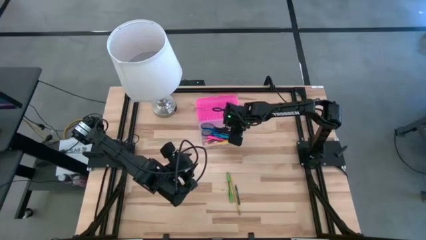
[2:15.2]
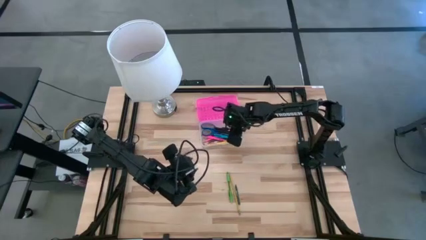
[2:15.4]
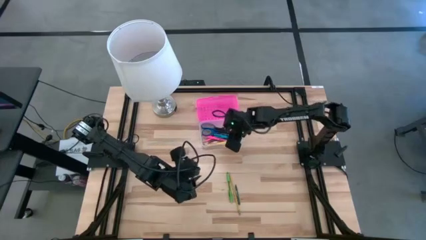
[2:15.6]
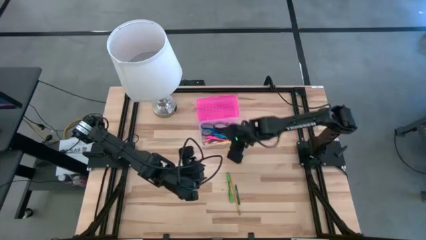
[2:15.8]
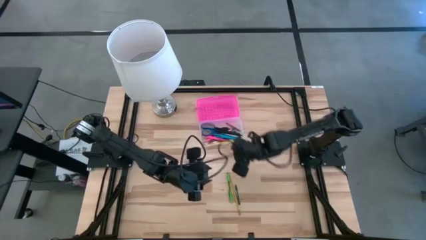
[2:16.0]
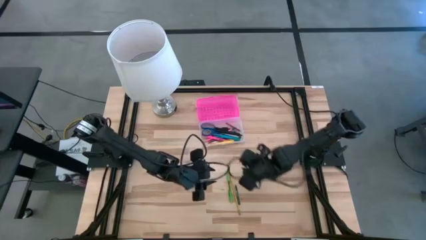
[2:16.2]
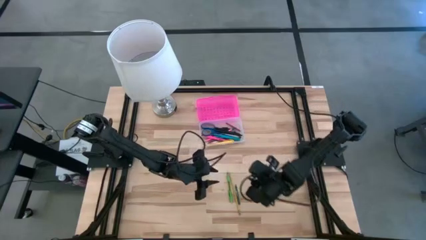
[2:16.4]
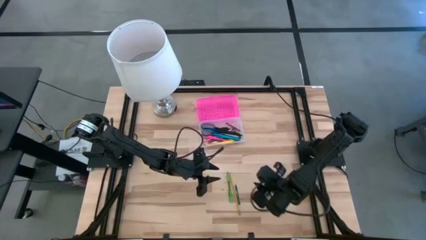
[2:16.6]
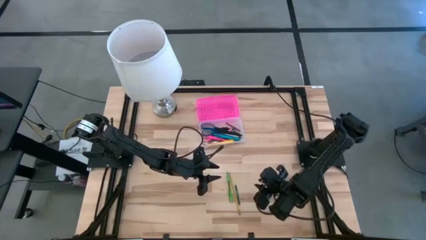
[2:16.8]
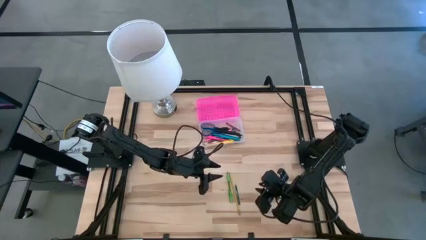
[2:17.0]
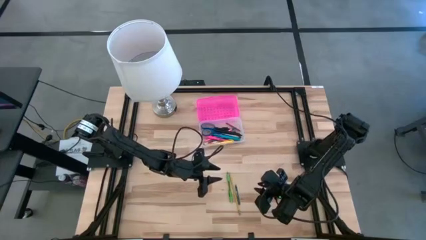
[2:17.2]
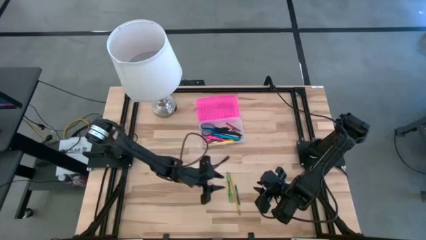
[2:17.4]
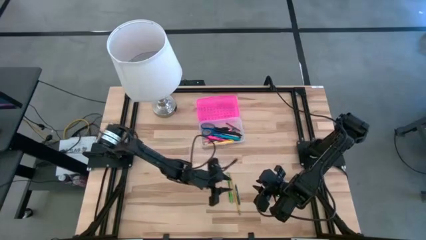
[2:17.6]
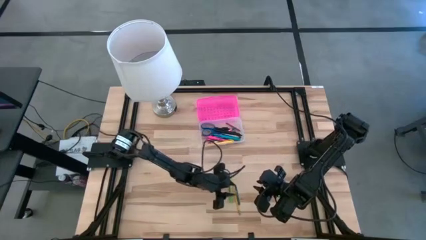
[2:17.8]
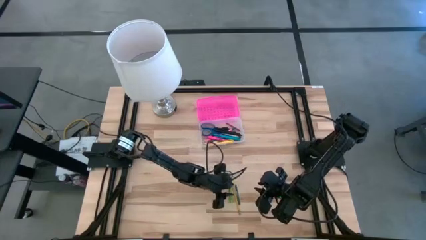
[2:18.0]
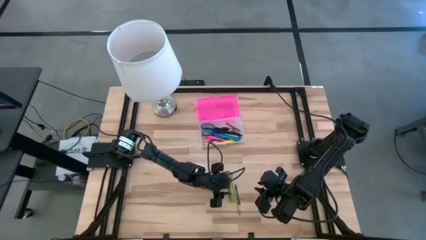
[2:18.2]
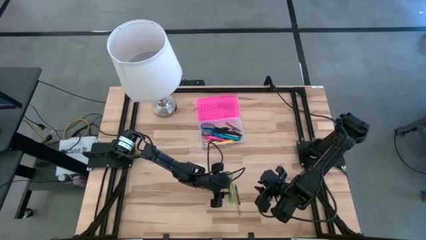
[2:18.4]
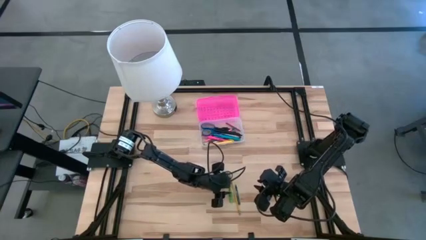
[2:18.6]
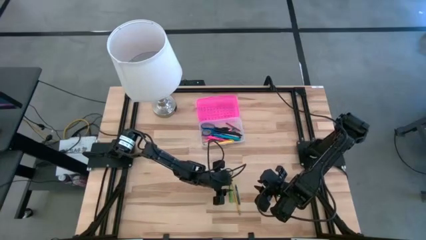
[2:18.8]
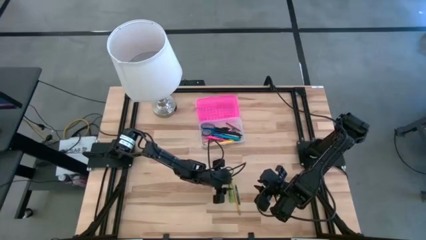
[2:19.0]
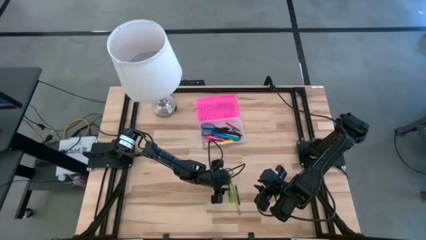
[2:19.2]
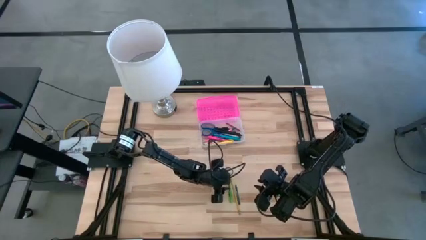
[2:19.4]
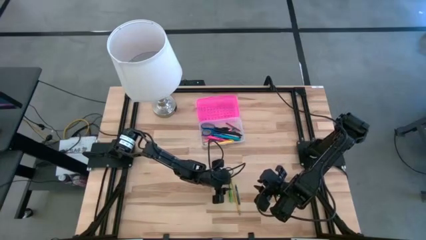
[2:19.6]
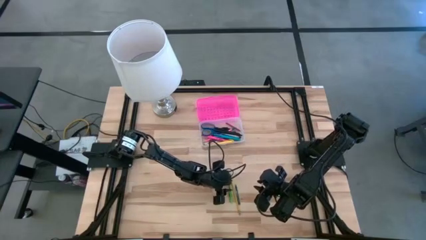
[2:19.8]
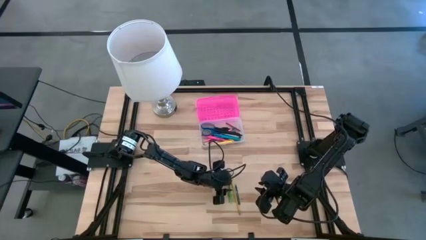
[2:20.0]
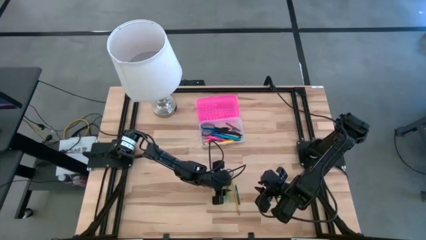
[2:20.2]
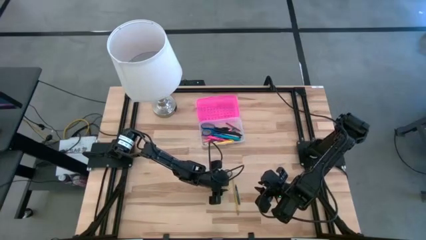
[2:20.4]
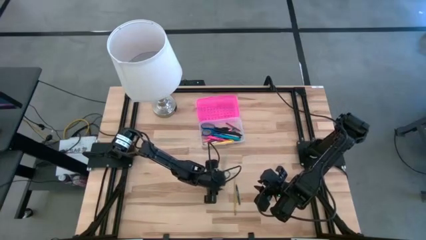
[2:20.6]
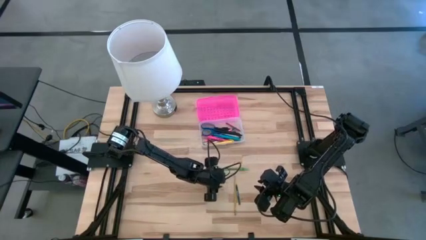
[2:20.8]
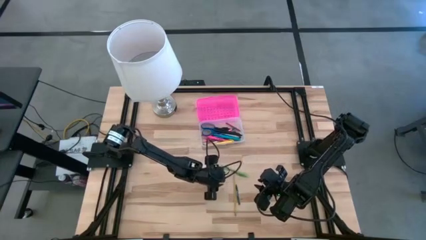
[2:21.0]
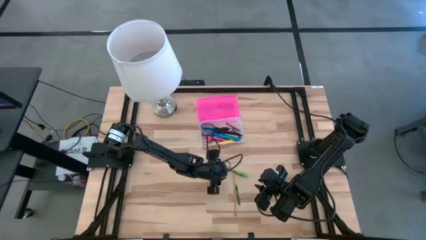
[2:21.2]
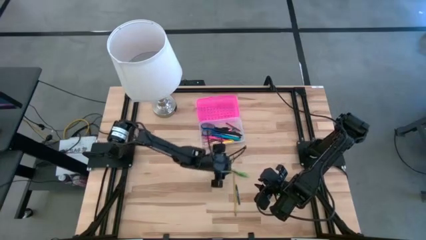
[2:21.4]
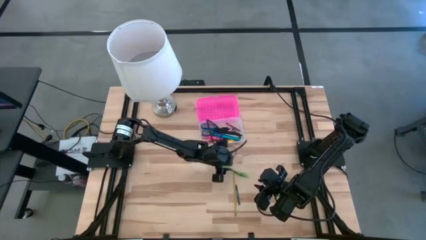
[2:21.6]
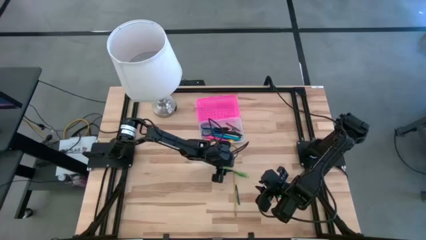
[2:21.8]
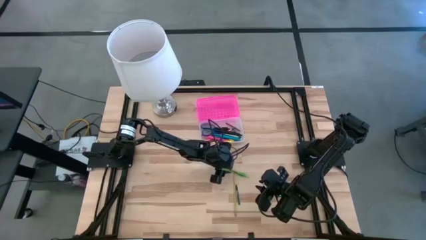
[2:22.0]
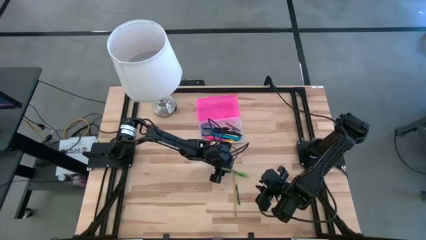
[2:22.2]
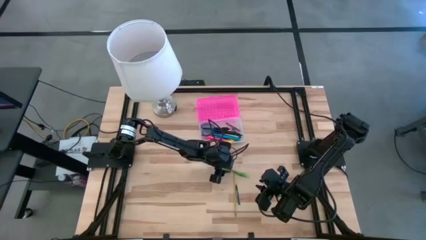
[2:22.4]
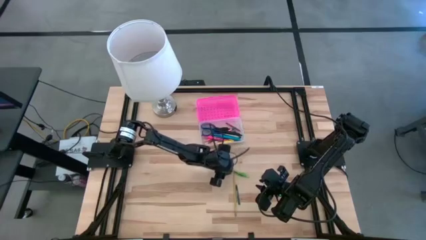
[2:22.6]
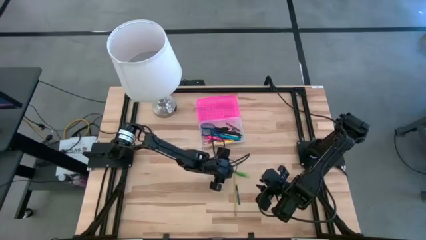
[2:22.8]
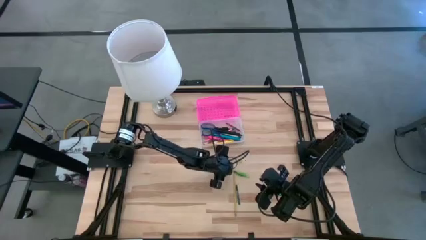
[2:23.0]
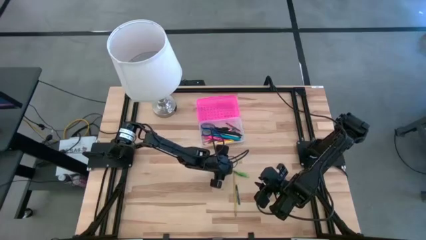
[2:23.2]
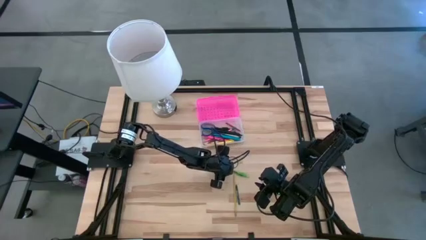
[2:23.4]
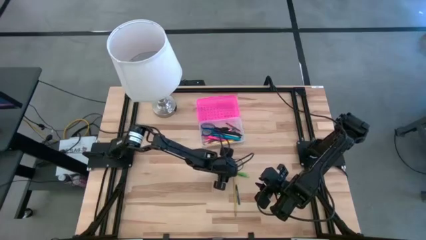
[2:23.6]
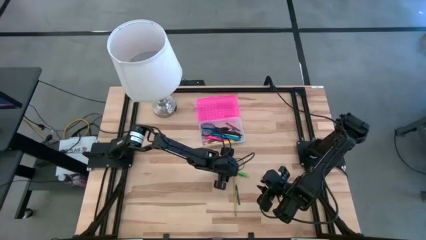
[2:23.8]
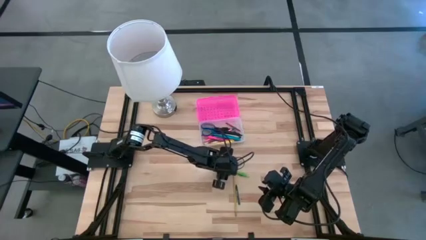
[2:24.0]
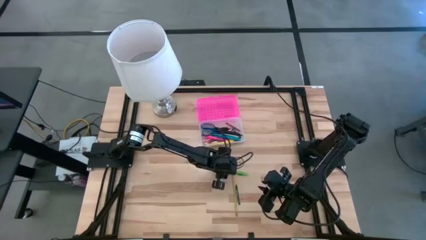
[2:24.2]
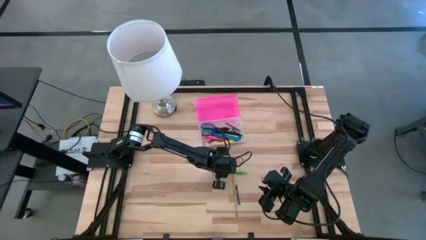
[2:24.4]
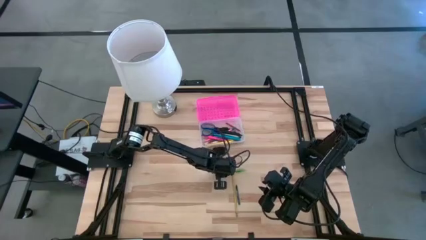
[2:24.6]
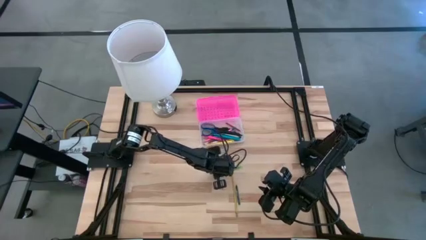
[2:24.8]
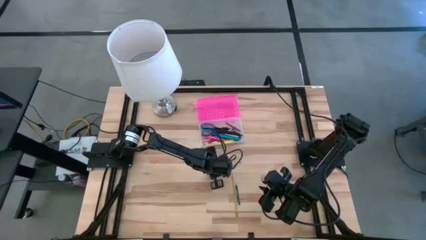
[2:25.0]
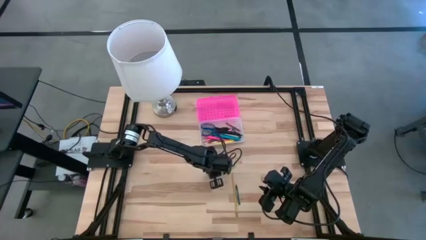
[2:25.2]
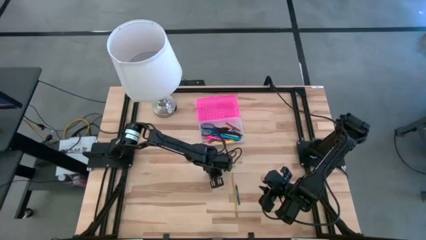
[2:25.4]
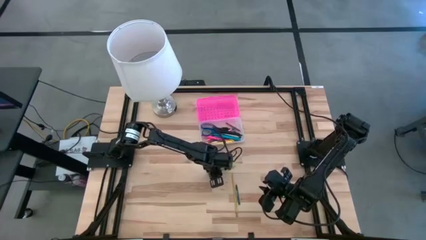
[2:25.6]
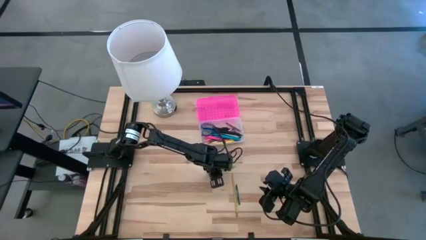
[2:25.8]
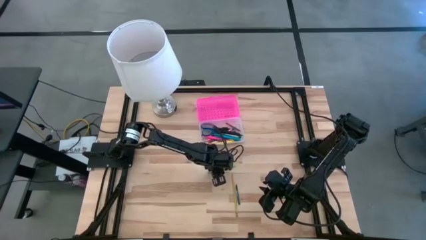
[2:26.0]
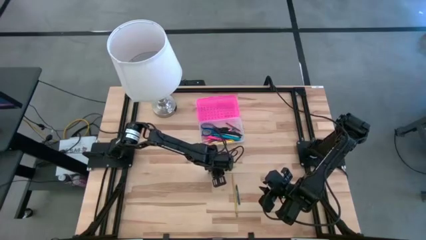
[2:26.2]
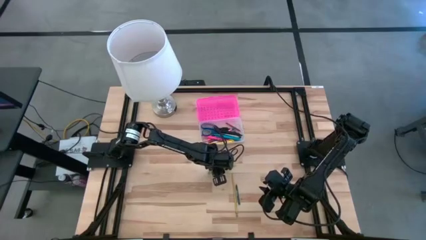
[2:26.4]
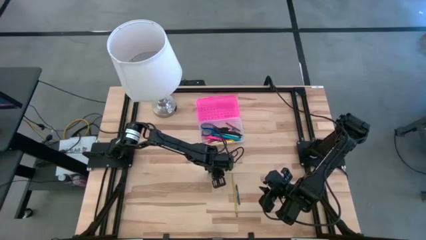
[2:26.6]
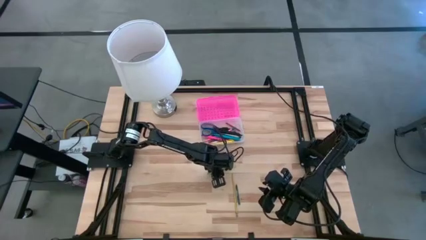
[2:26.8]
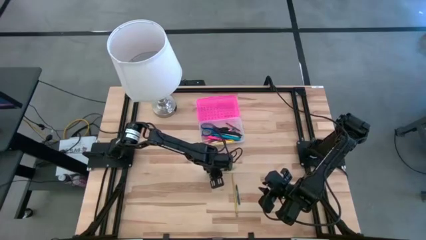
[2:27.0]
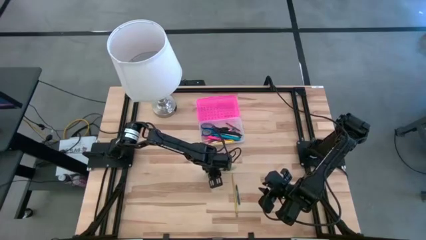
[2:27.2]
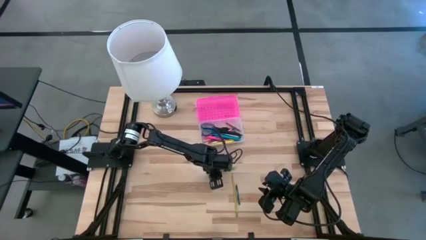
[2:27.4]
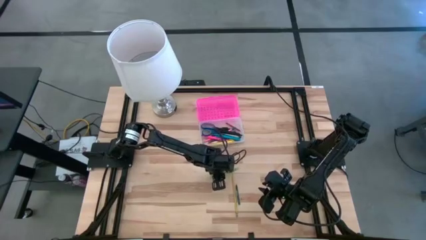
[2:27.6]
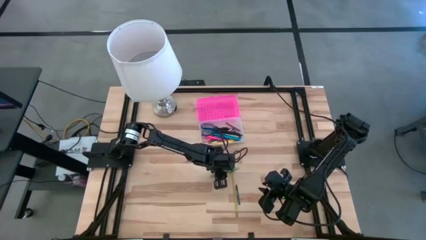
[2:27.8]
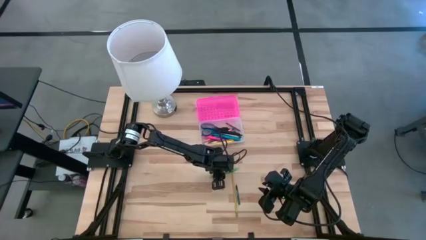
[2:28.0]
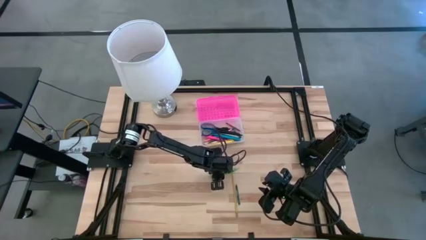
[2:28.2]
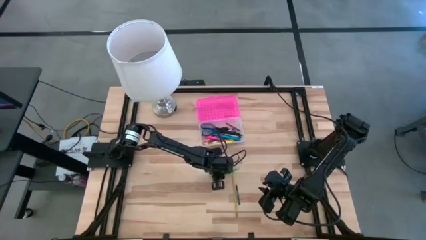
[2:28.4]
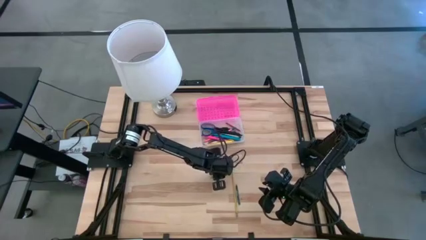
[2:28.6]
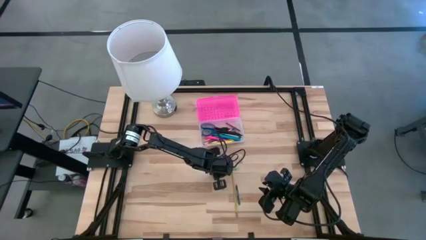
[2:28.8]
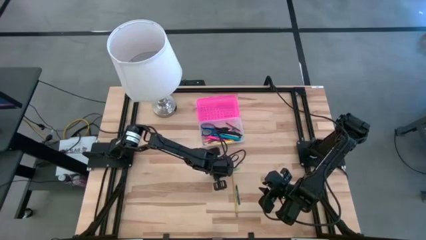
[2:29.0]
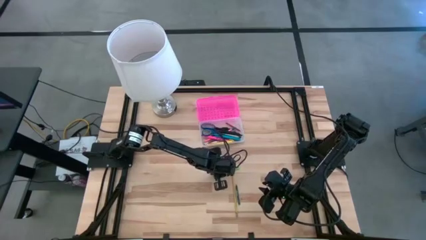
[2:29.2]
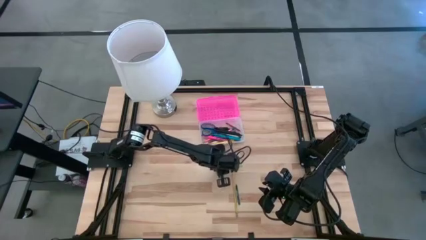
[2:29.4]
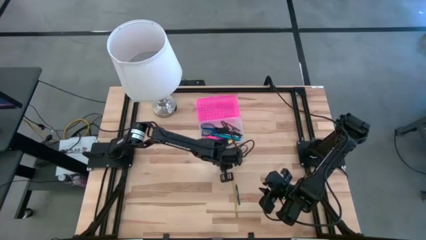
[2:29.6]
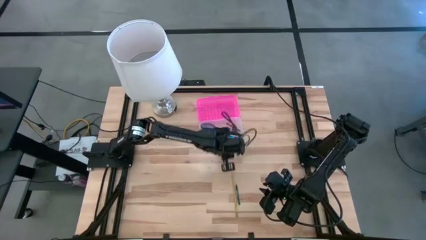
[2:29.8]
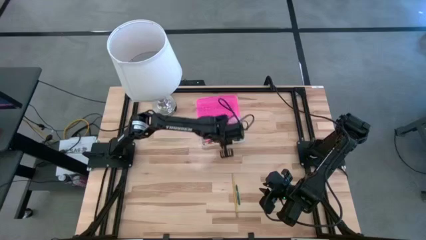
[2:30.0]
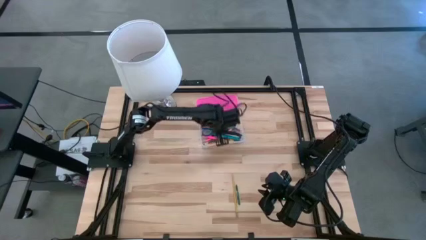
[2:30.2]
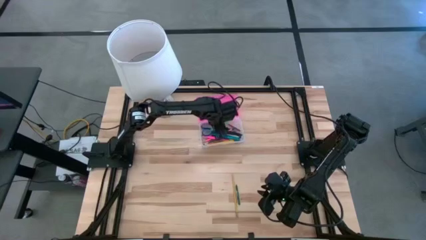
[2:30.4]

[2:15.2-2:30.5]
Task: Pick & place school supplies into a supply box
Put the light green pen into the pink supply box
